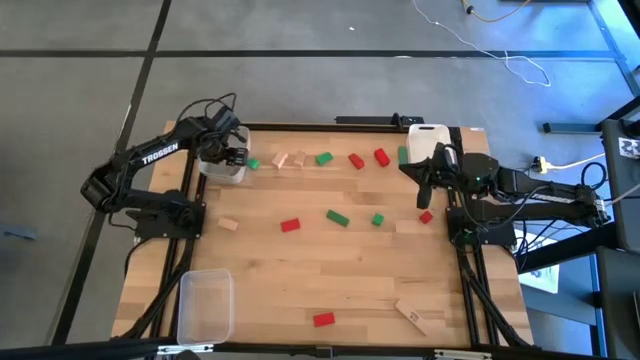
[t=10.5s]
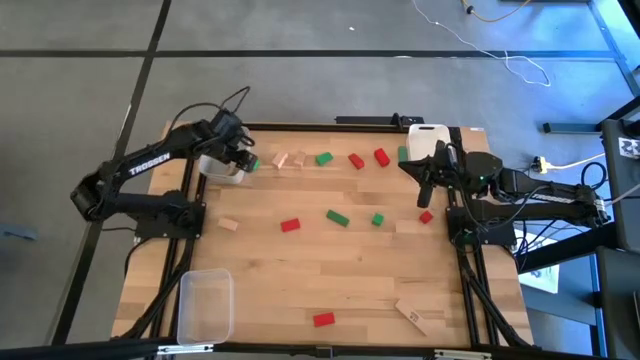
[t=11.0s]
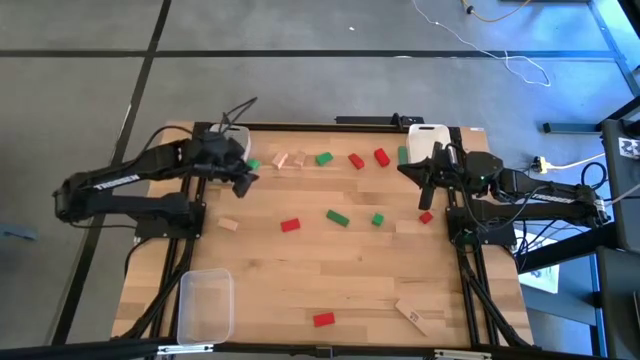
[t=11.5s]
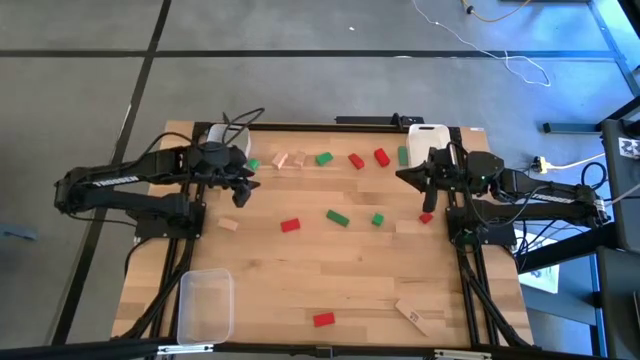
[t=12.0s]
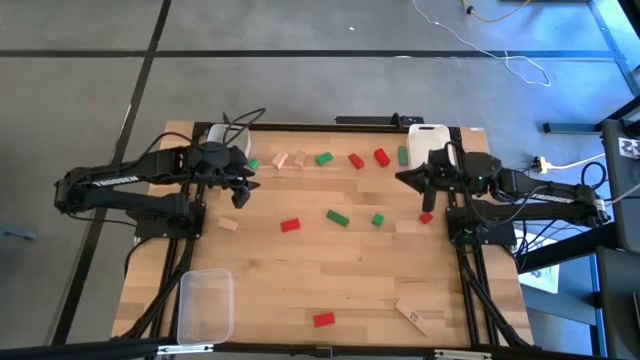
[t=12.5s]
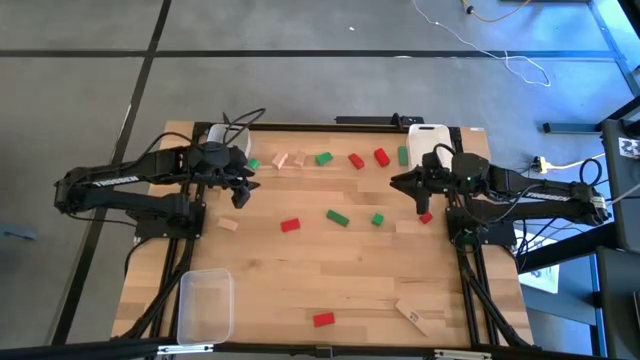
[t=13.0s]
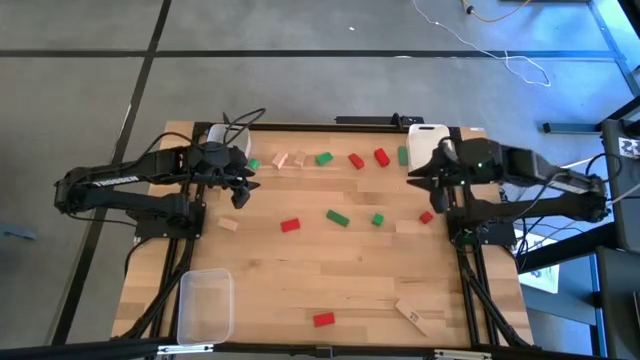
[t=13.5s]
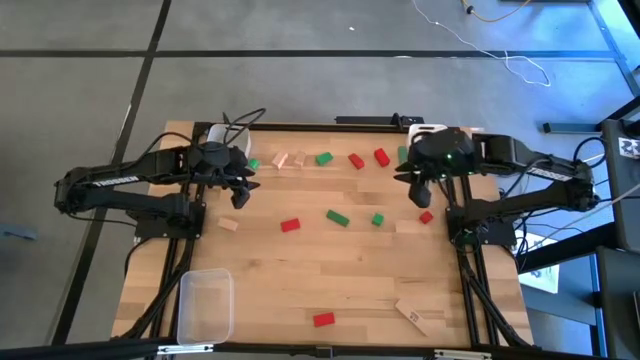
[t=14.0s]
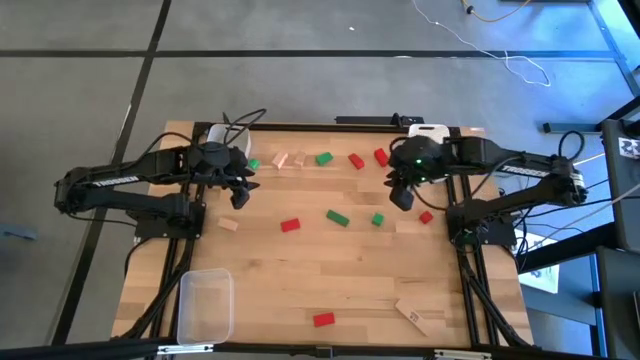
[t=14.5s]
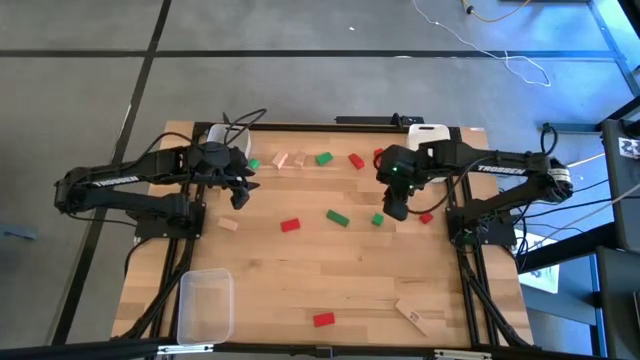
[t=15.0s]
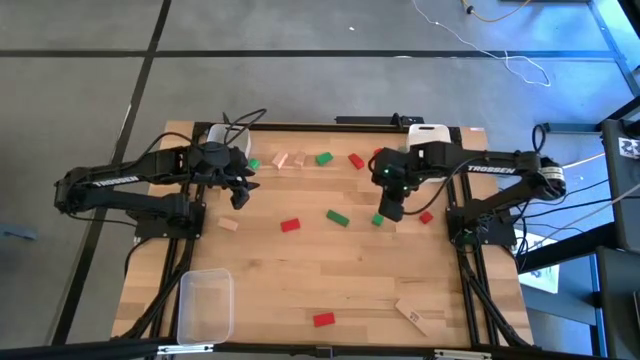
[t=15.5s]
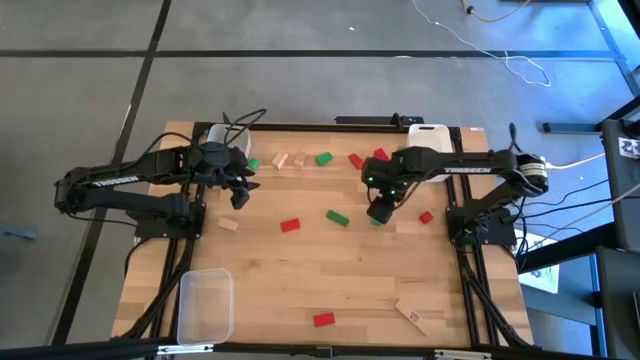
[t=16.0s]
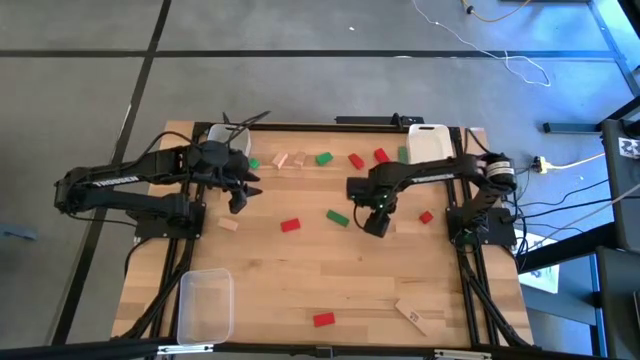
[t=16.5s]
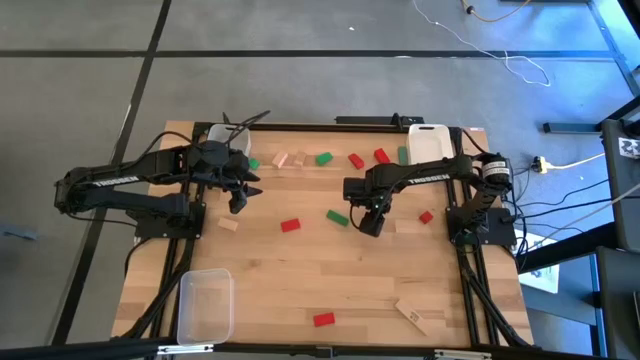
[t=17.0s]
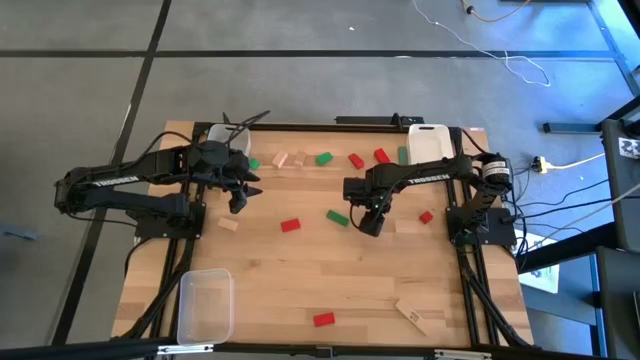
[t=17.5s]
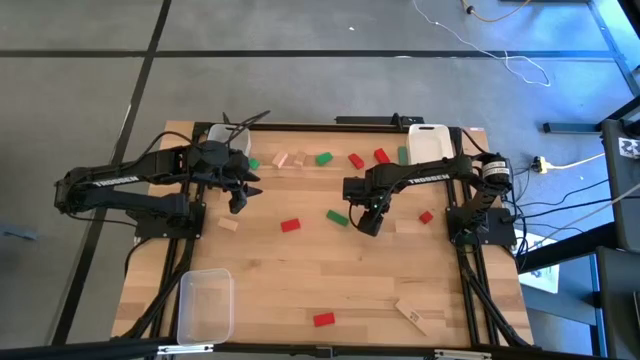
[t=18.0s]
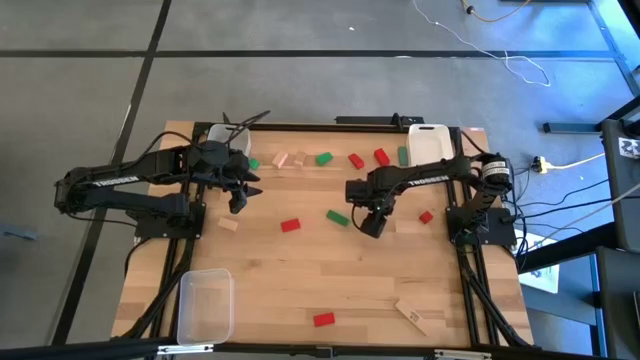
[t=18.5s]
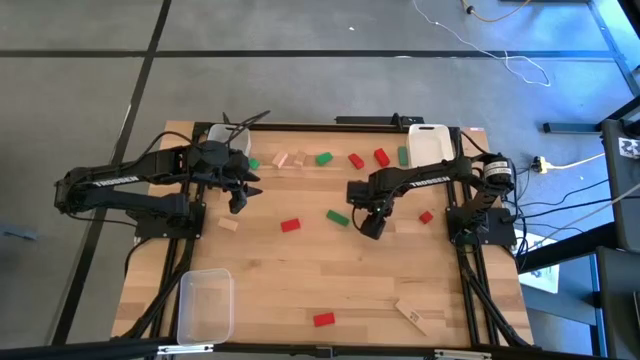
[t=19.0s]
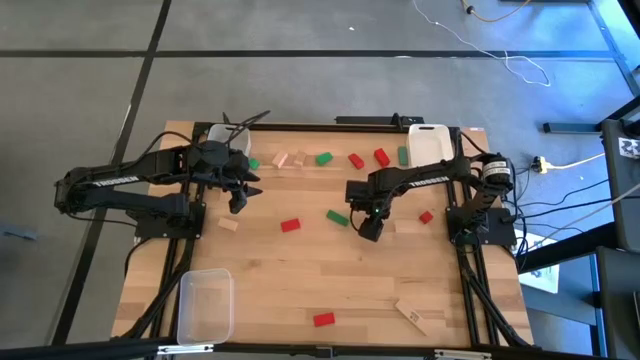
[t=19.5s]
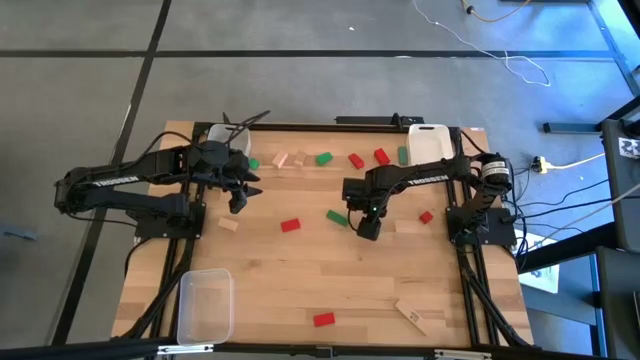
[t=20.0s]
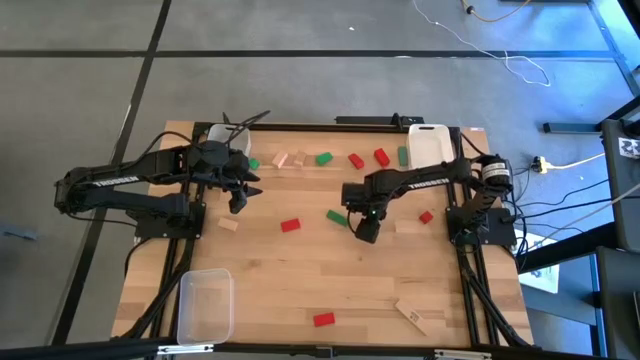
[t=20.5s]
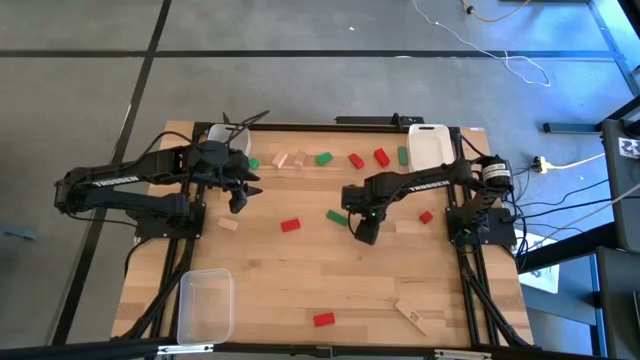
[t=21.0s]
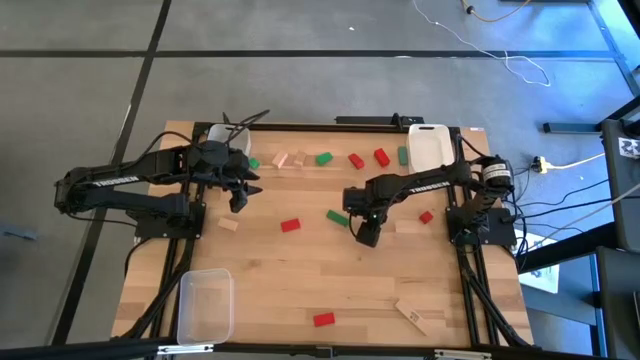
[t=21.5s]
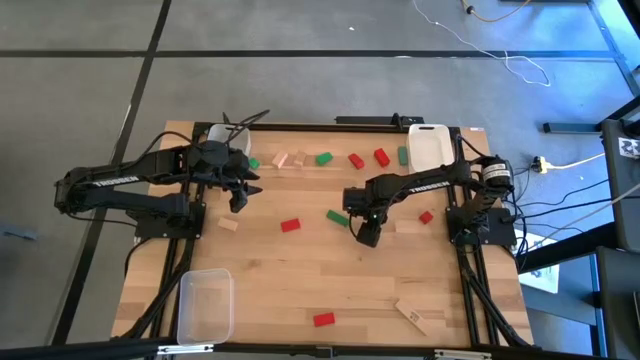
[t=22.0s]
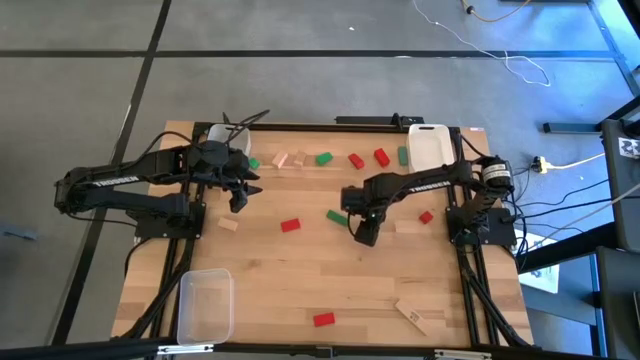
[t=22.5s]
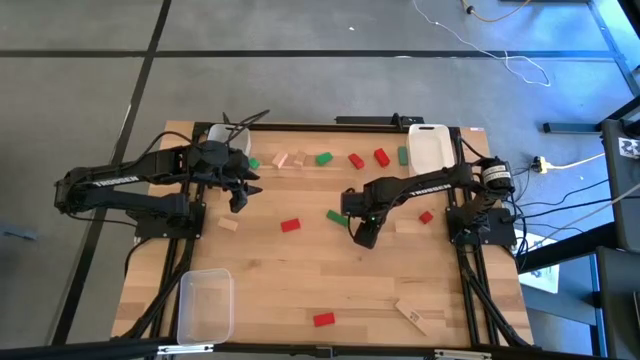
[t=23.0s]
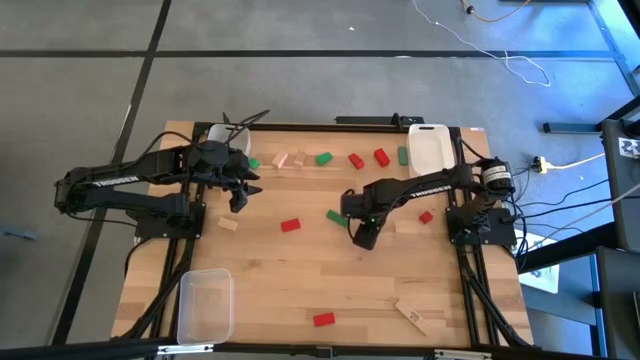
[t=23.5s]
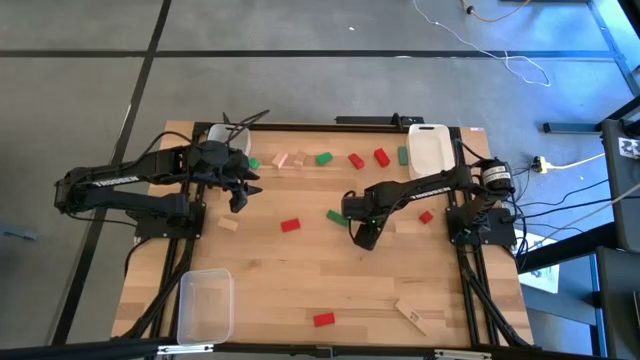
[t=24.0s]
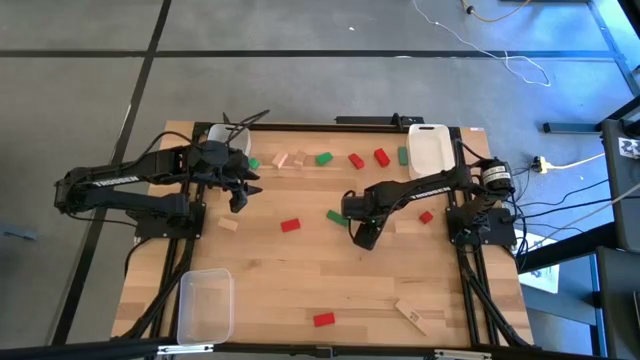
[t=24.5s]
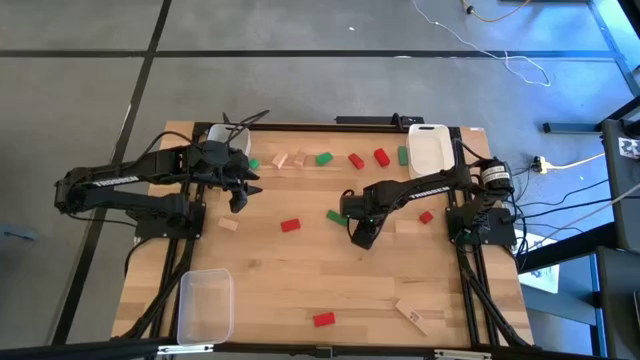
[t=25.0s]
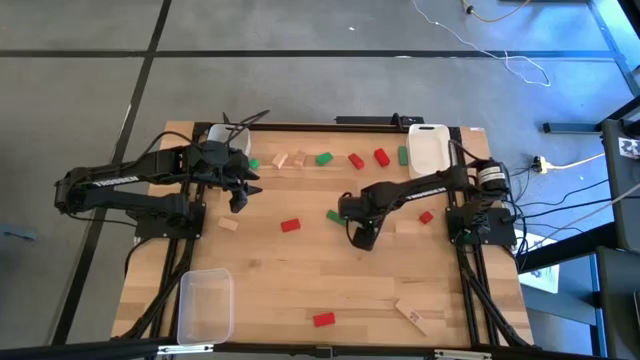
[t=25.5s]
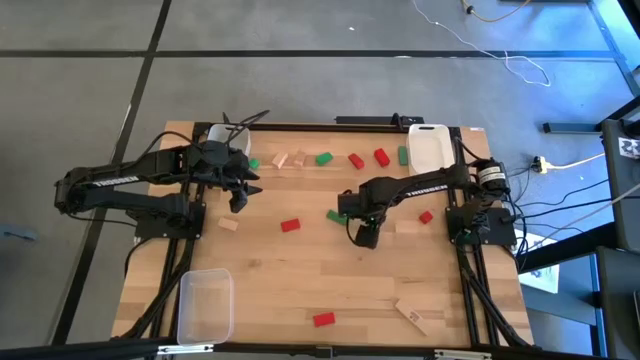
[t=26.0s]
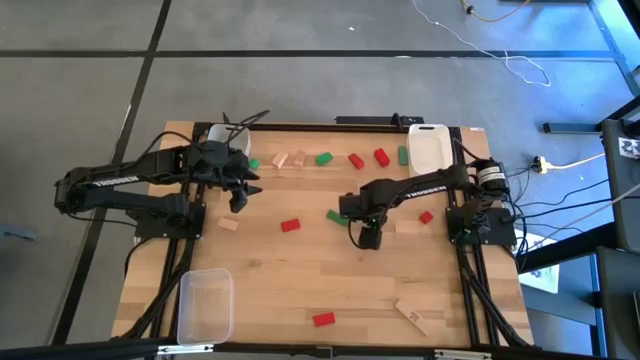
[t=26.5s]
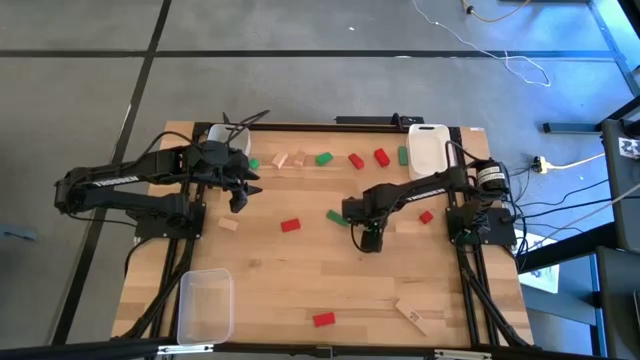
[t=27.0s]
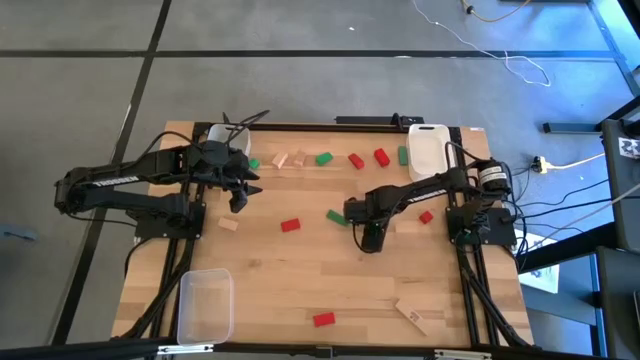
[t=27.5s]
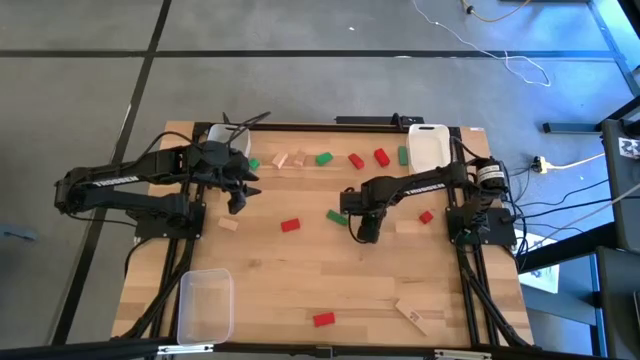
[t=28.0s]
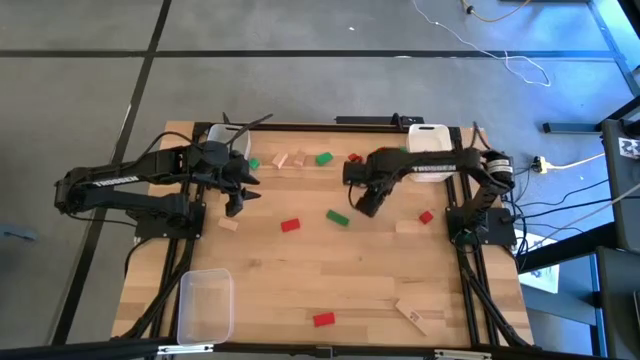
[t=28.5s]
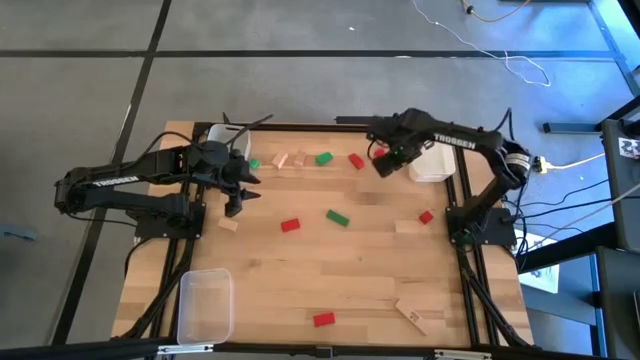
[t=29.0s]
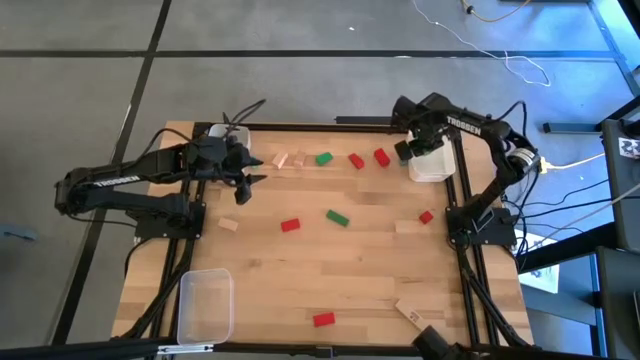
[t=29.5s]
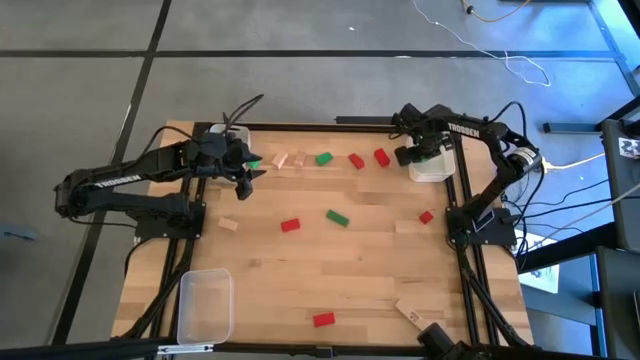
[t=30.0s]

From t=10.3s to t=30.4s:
Task: Sort & place blocks by color
Put the green block into the white bin

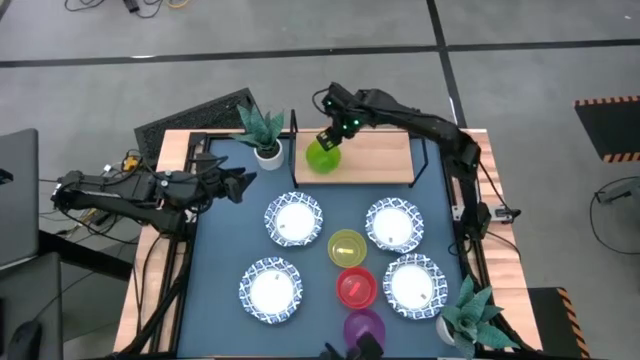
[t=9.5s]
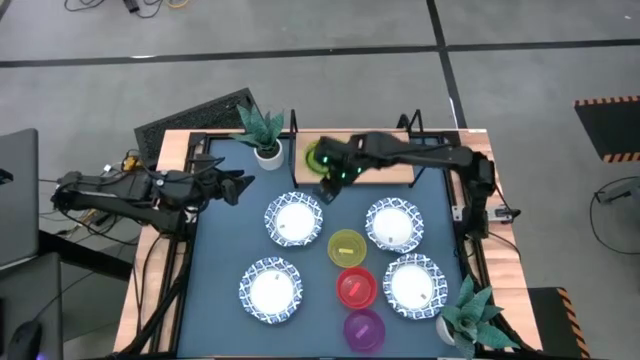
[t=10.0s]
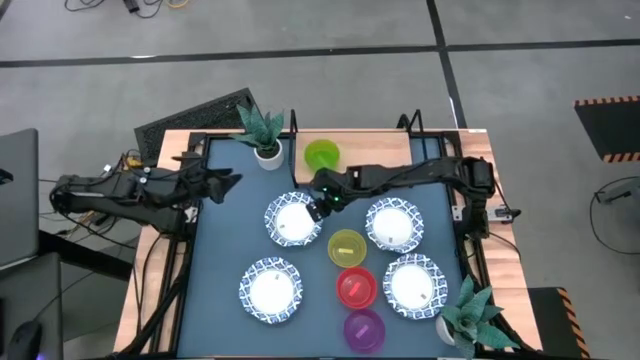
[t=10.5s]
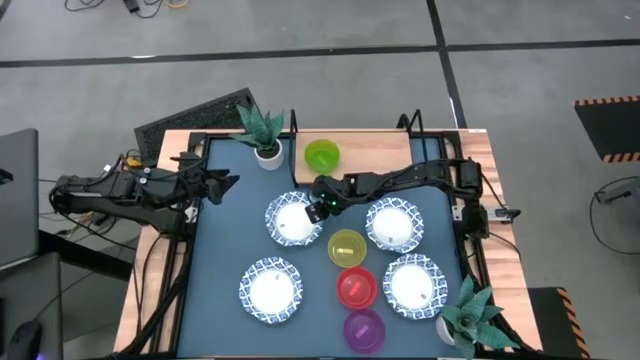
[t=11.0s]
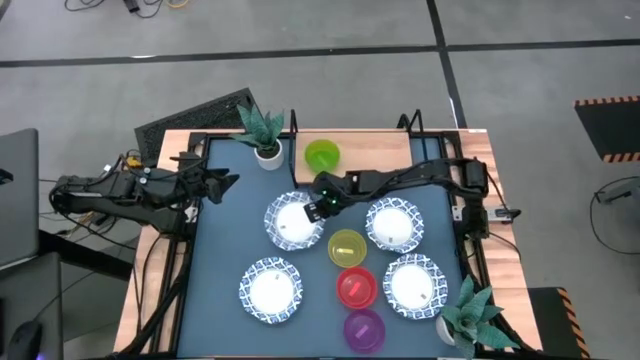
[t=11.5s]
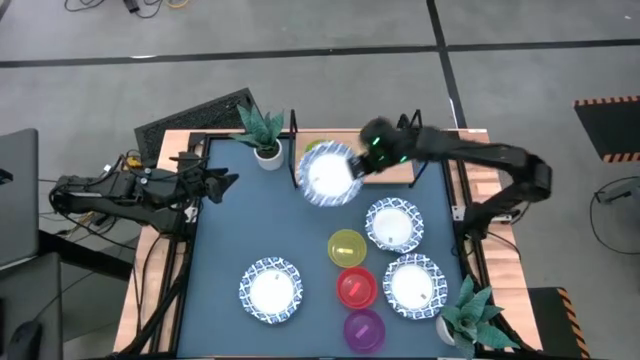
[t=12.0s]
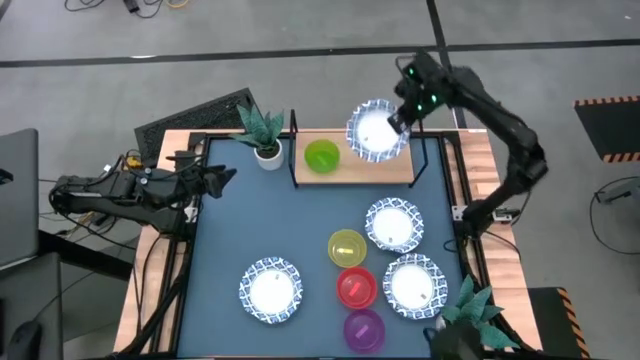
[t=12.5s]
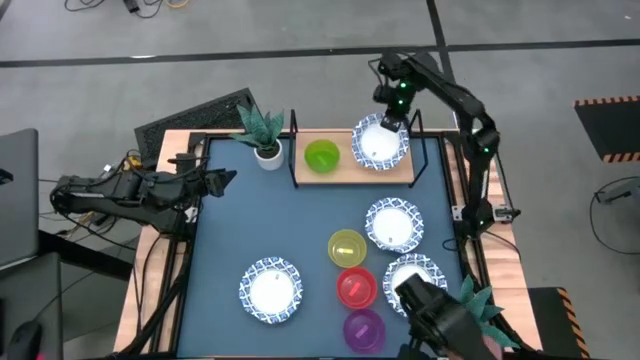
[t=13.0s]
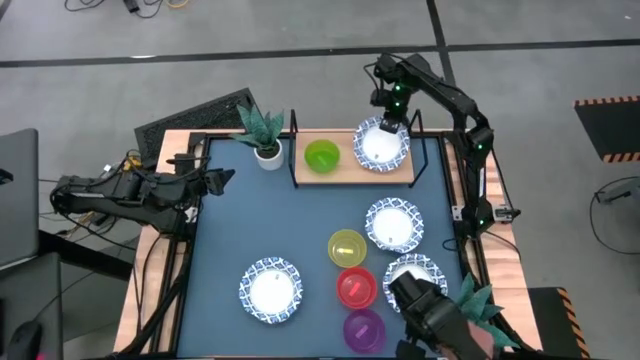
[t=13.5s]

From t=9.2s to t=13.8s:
Task: Place and stack bowls onto a shelf
Put the white patterned bowl on the shelf
